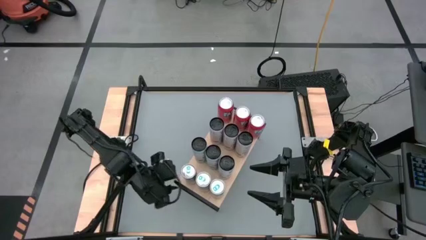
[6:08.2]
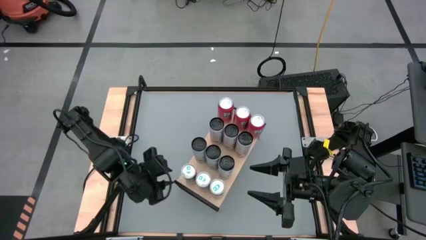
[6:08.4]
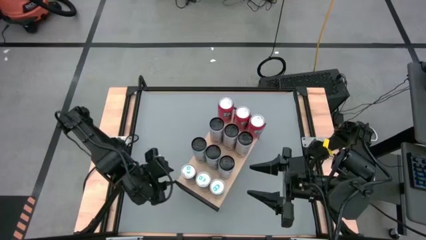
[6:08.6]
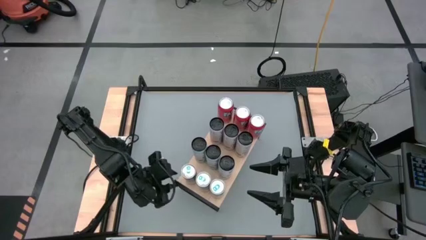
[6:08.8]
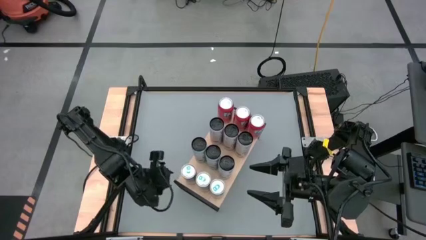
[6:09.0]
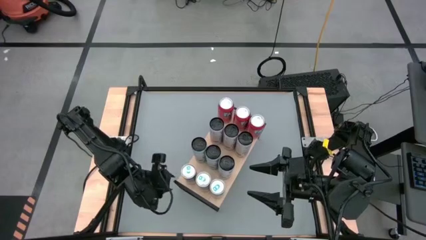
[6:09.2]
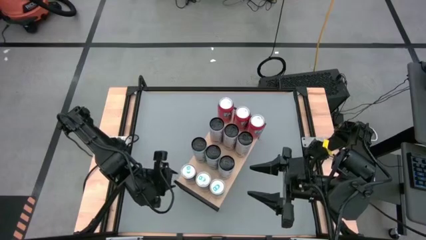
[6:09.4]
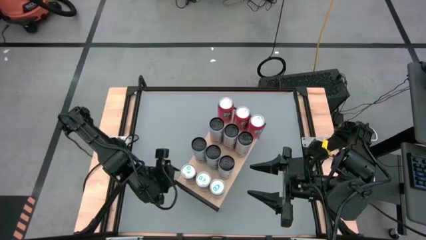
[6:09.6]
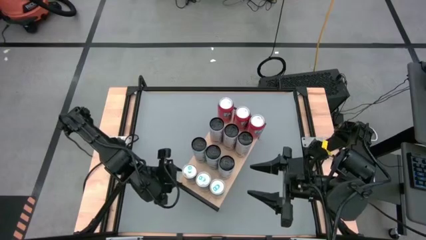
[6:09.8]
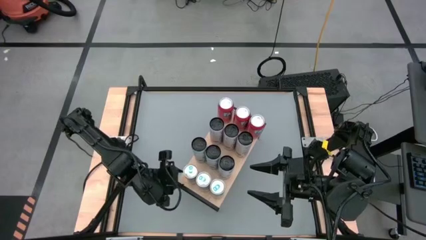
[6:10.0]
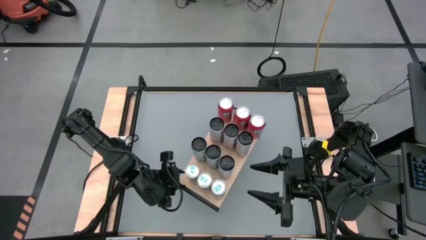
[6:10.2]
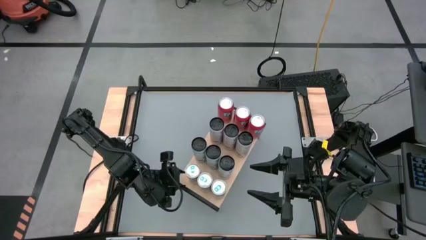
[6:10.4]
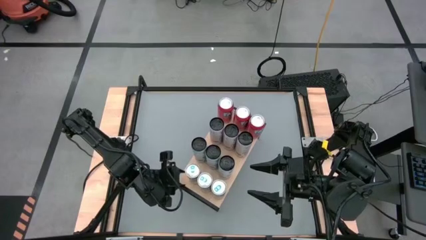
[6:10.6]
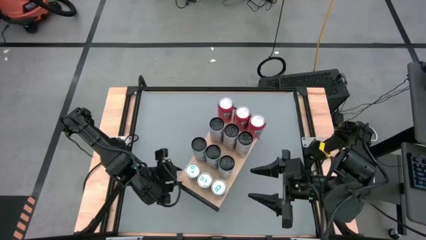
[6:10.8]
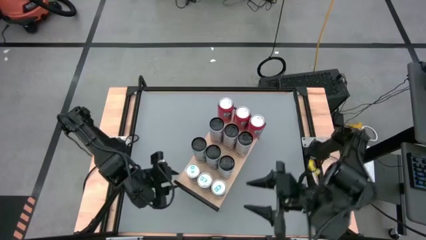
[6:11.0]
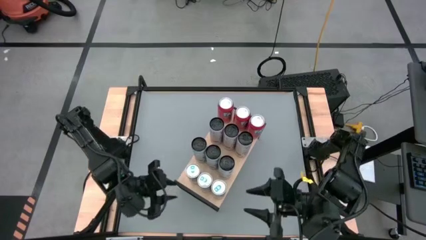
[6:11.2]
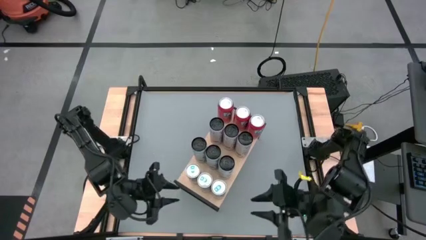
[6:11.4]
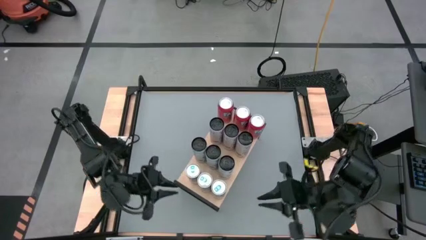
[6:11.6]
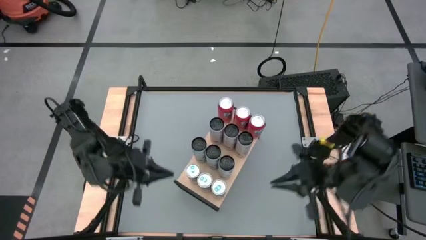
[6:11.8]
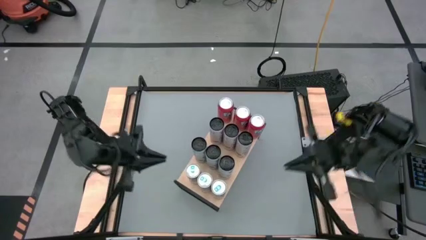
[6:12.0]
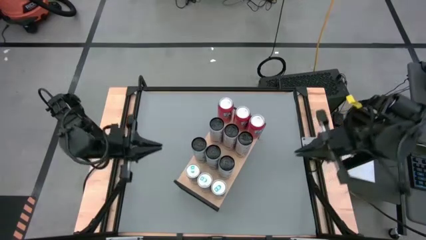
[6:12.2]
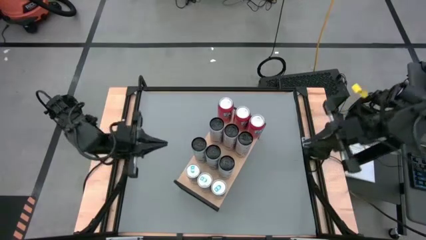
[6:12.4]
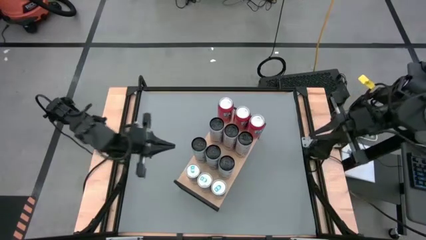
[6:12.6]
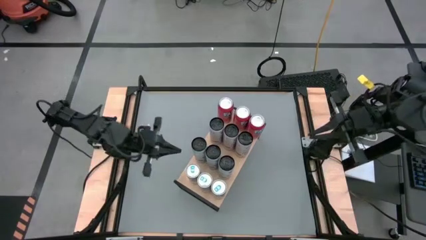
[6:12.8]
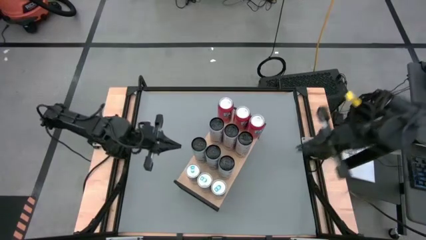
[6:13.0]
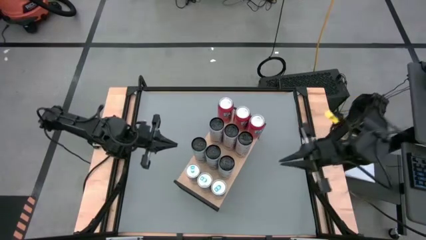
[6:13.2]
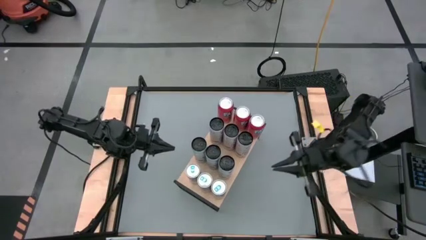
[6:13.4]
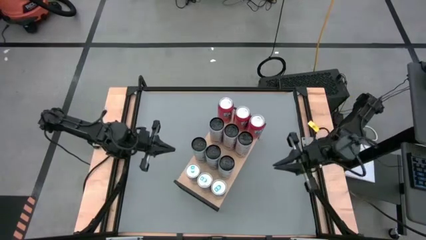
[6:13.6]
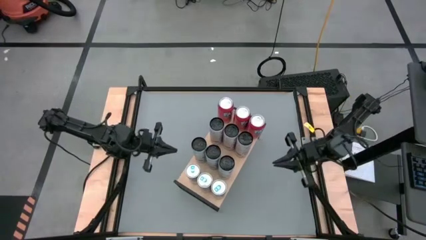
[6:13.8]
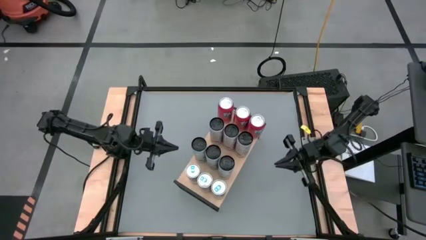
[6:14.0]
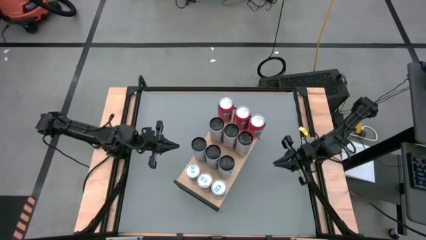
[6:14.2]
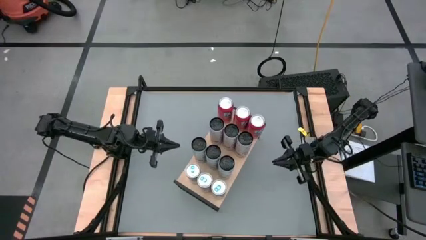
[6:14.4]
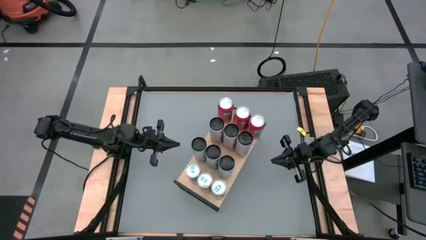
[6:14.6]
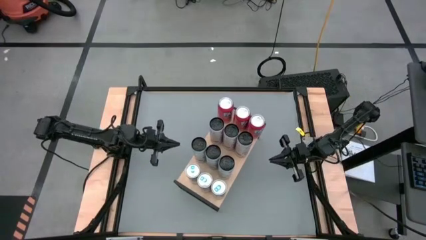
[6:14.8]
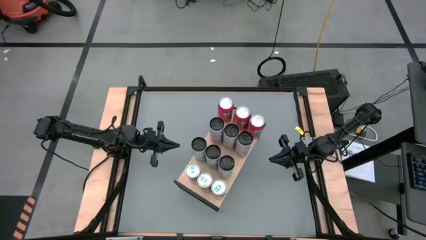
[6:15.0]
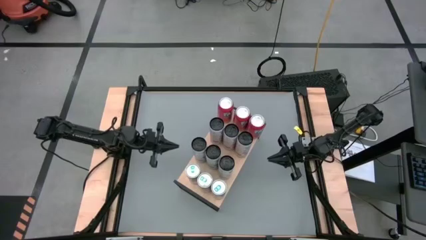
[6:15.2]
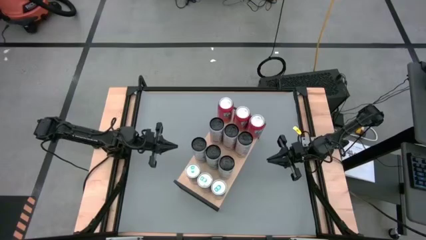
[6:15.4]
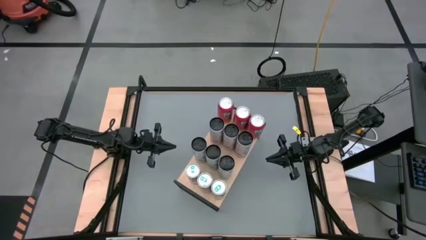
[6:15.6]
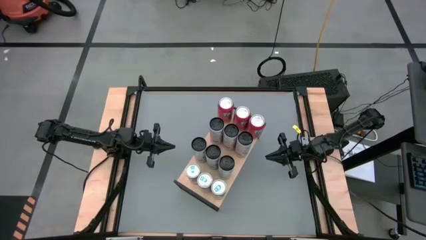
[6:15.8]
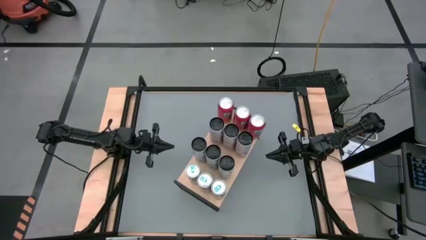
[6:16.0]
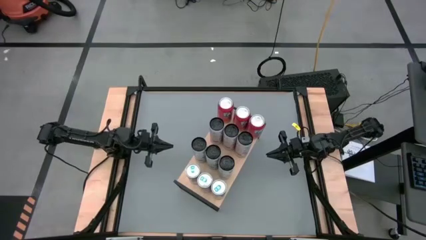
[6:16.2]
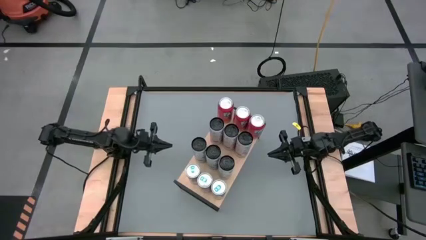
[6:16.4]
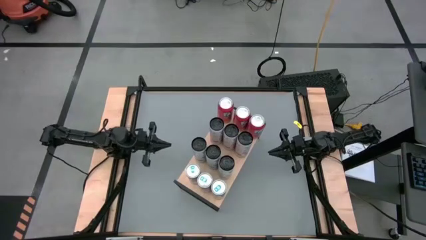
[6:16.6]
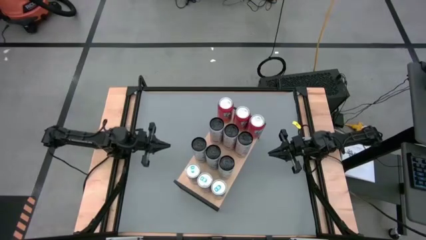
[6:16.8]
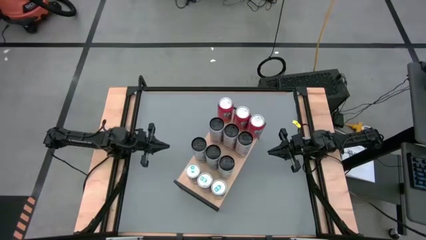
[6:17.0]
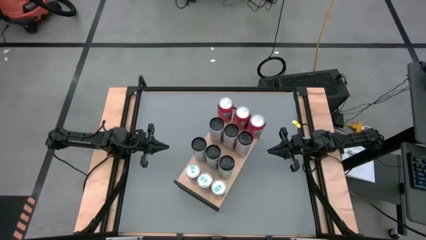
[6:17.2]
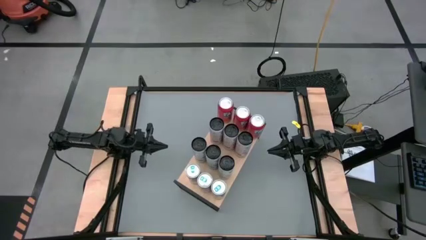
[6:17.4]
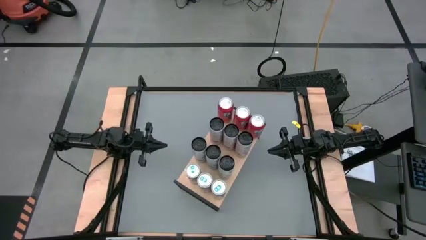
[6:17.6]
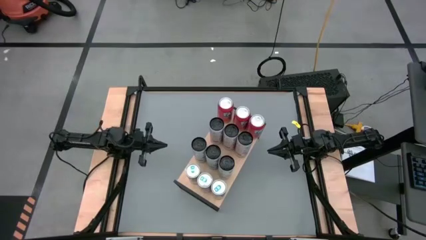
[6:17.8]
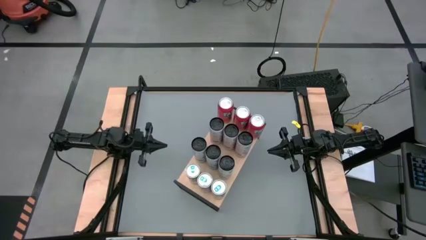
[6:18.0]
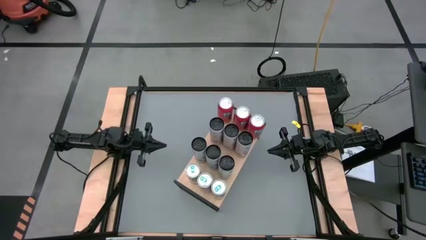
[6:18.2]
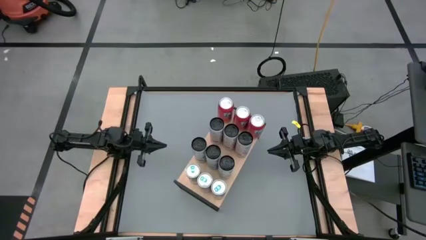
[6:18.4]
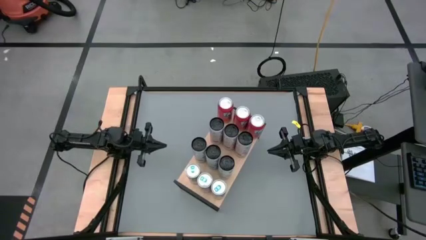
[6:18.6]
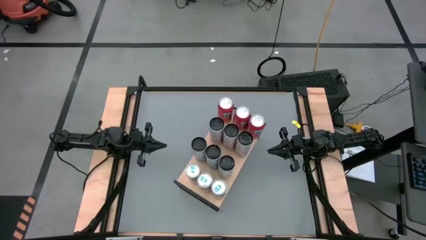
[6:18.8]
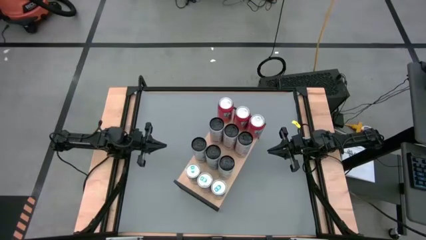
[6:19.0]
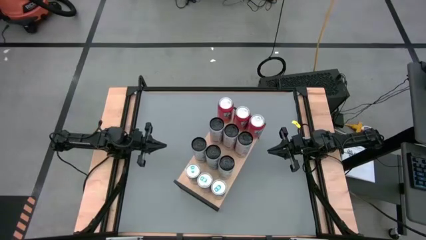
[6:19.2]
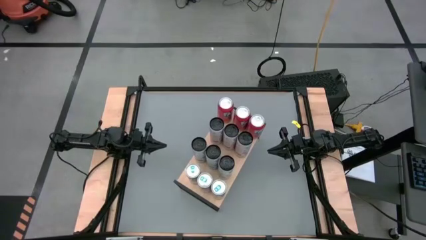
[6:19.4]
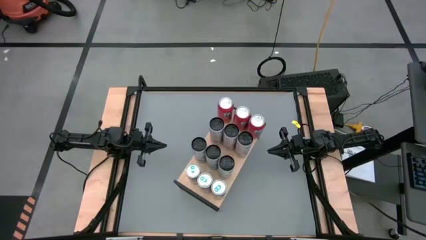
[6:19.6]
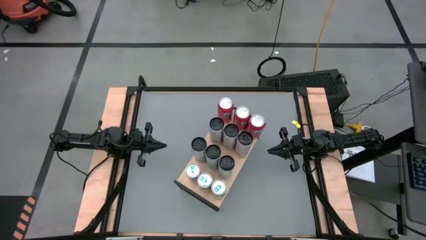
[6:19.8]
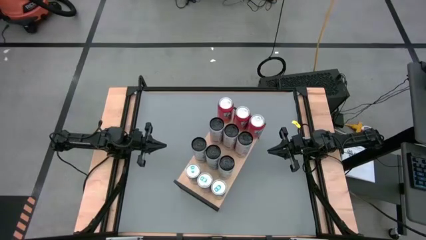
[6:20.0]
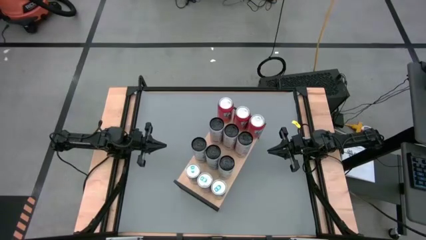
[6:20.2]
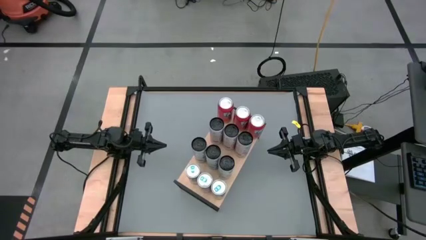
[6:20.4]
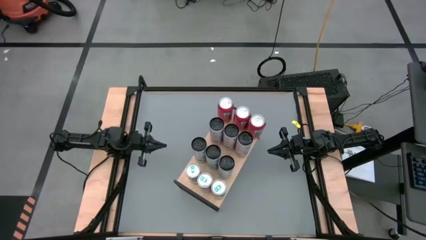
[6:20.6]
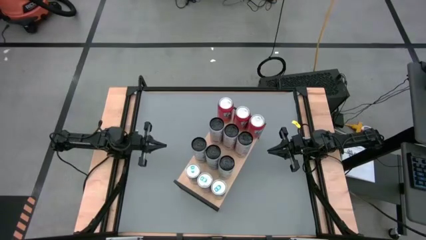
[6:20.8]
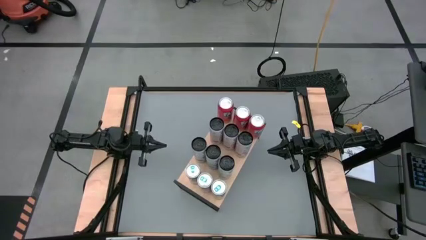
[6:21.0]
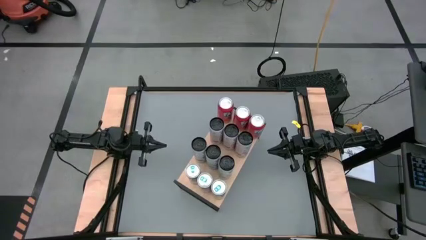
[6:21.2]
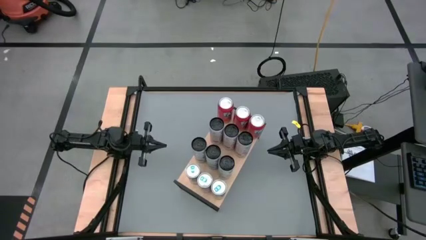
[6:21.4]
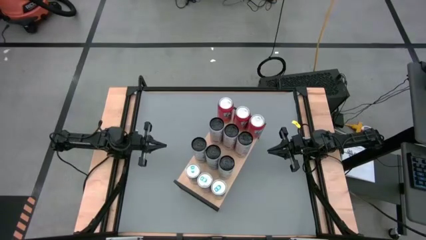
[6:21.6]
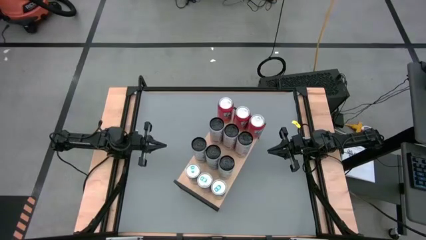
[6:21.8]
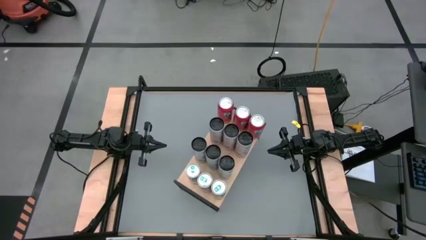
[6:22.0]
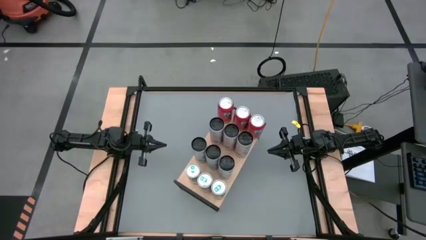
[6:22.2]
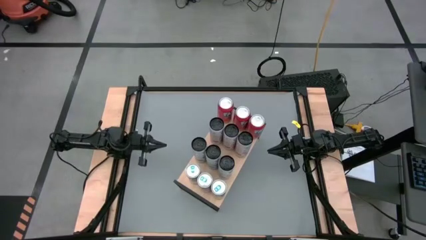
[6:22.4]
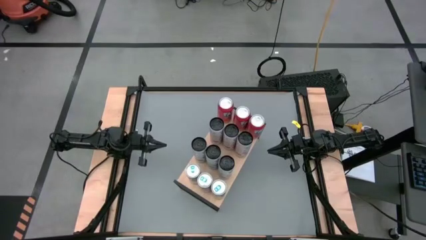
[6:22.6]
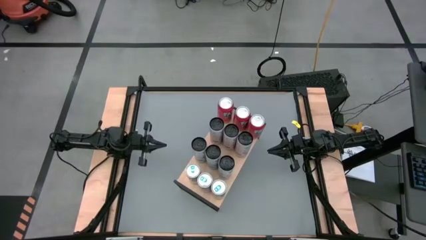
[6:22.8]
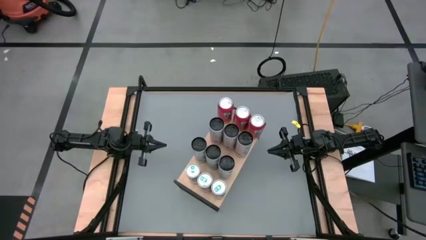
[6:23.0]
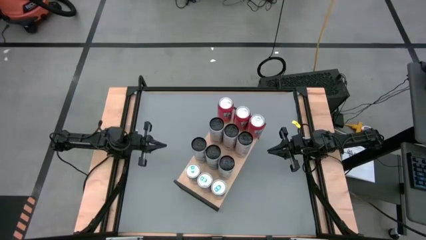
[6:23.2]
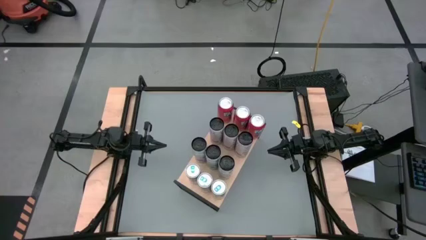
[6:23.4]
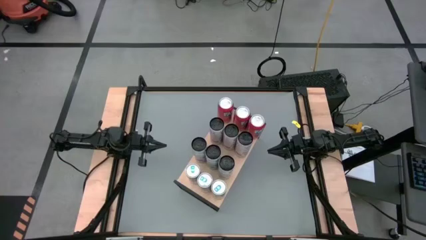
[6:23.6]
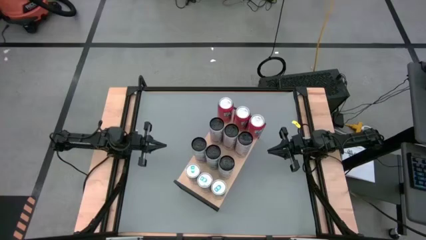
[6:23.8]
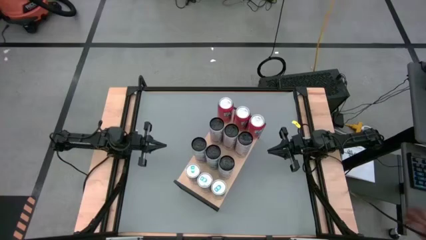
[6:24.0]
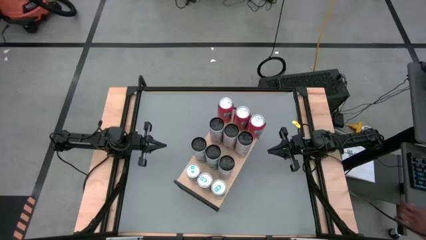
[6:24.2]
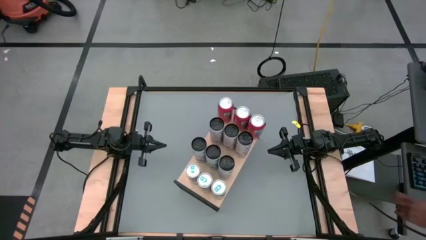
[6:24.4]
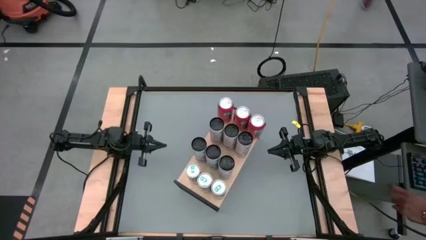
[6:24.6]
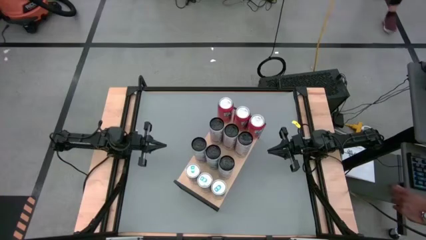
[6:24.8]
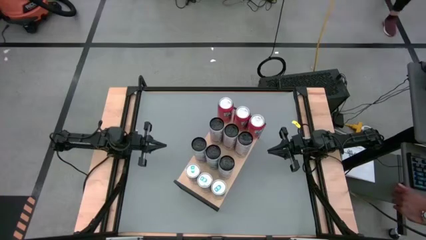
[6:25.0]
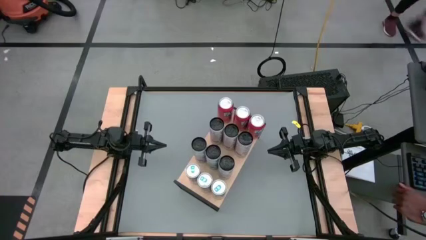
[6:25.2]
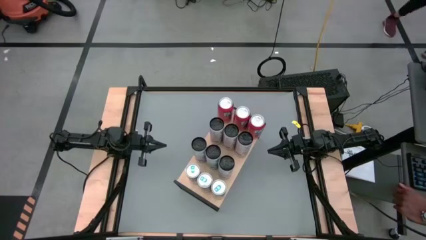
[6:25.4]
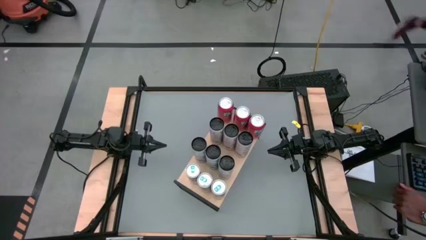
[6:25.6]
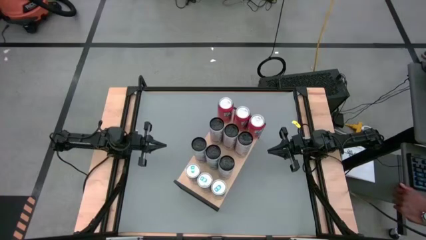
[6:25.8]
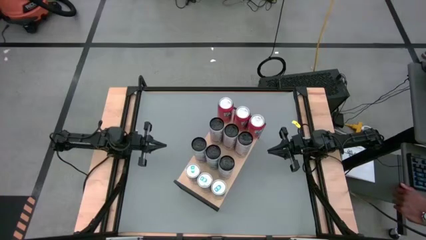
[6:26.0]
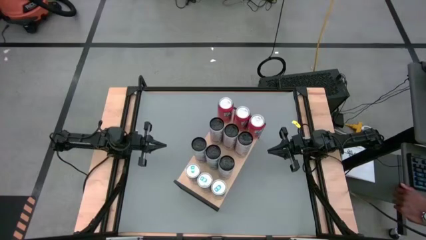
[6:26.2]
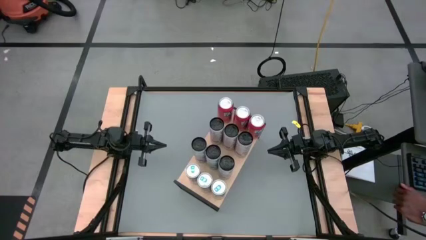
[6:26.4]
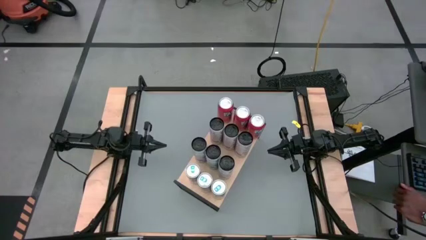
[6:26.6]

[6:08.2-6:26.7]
Task: Place canned beverage on shelf
Return to Home Position
